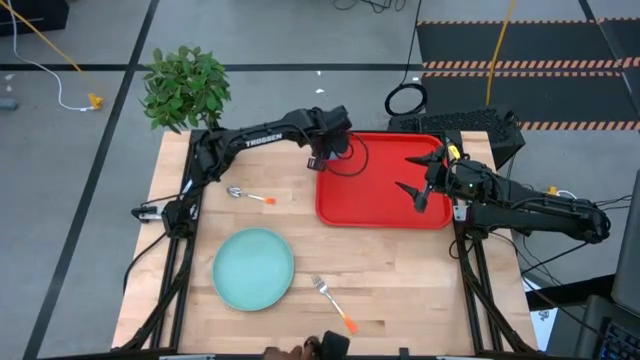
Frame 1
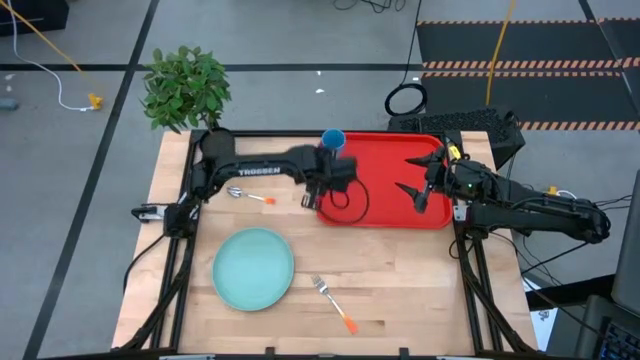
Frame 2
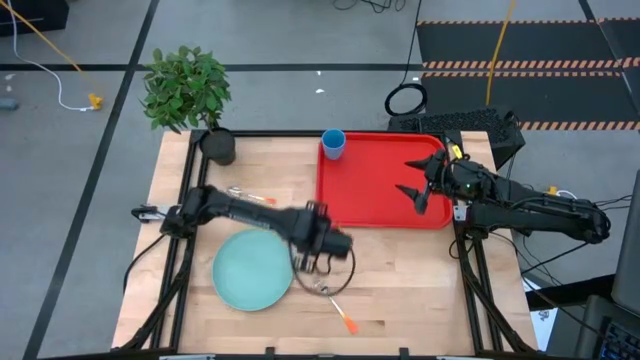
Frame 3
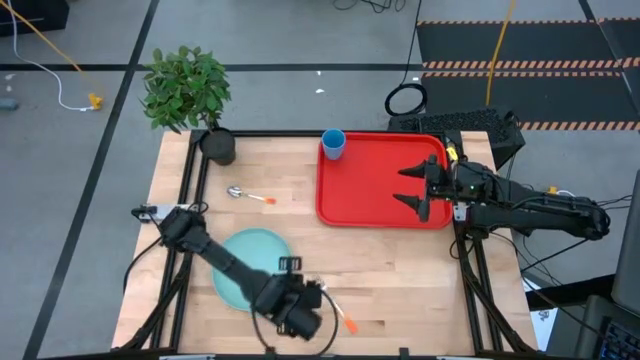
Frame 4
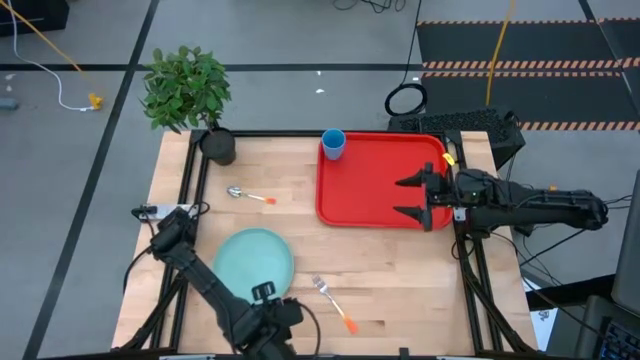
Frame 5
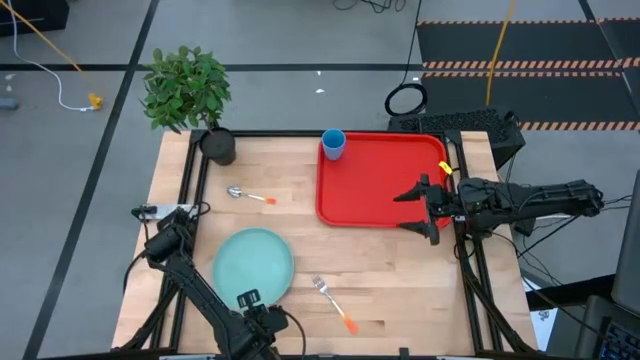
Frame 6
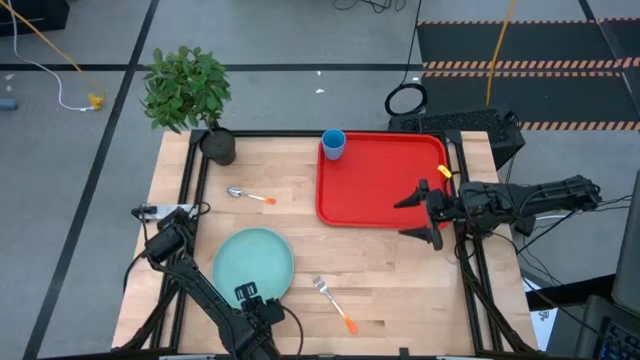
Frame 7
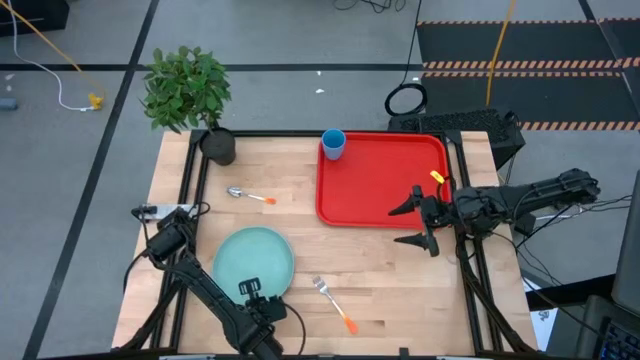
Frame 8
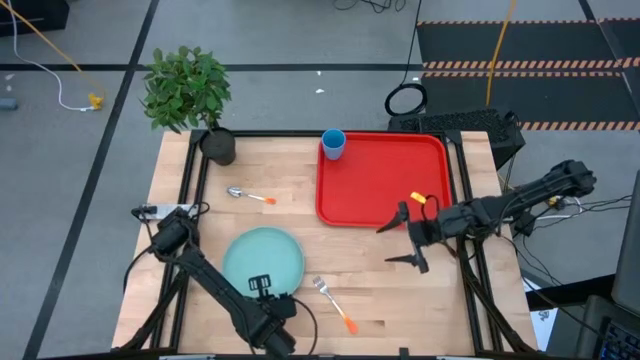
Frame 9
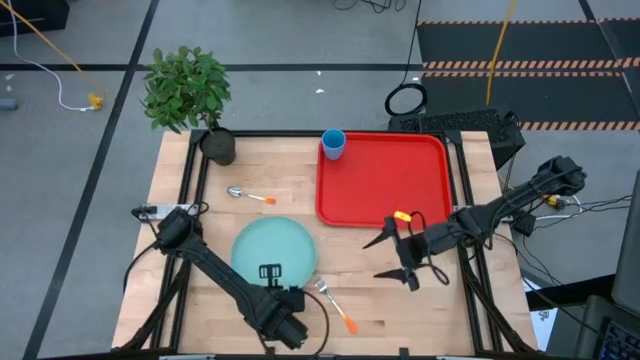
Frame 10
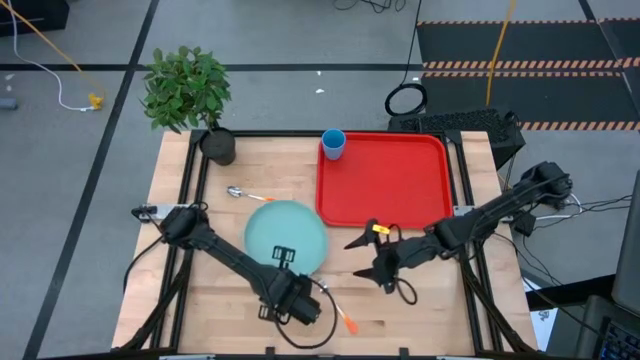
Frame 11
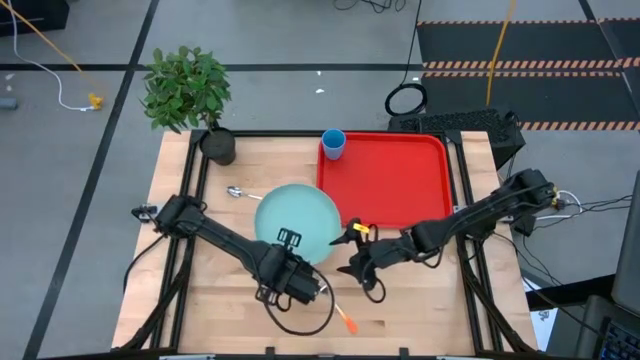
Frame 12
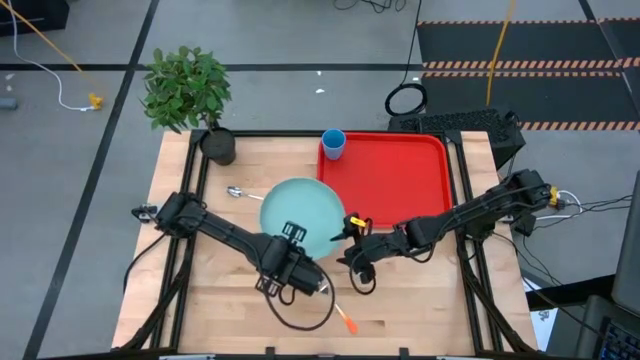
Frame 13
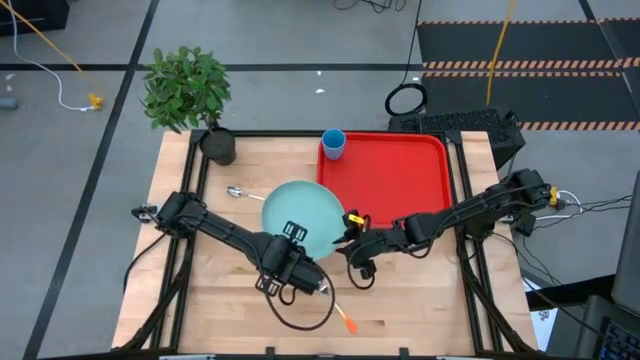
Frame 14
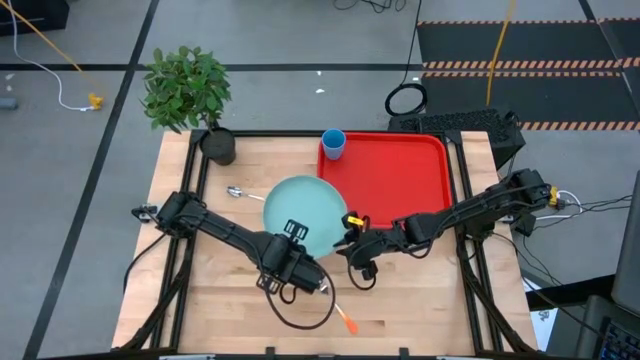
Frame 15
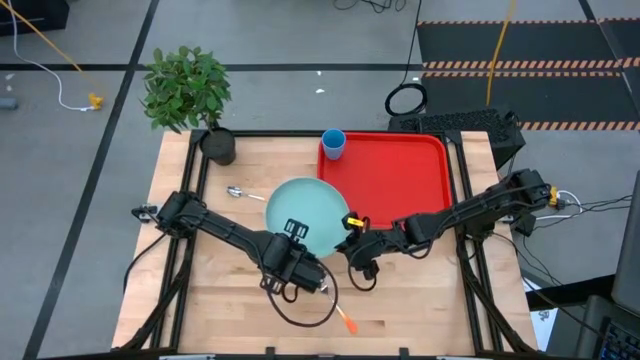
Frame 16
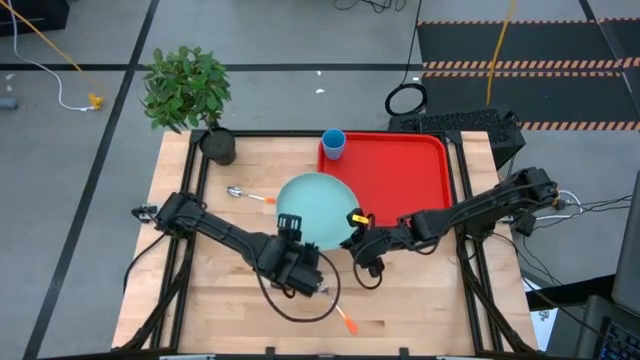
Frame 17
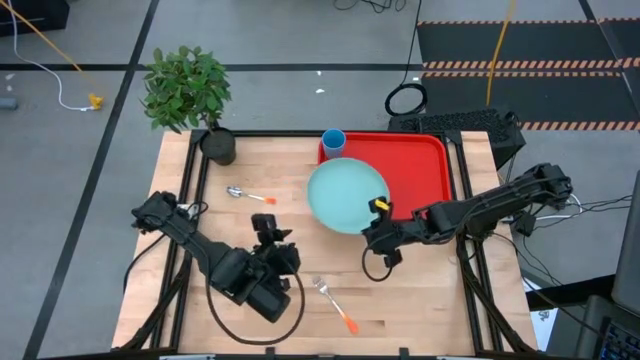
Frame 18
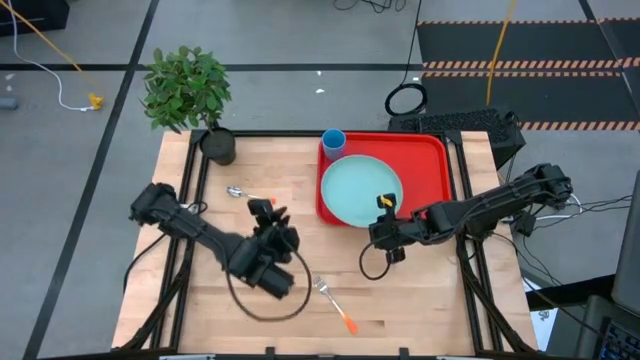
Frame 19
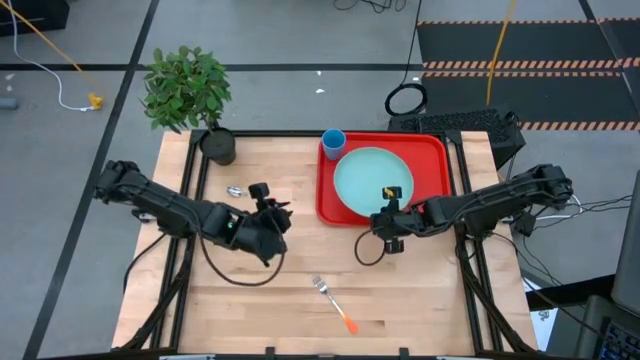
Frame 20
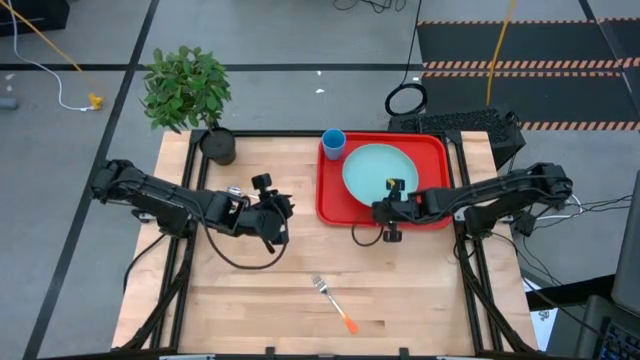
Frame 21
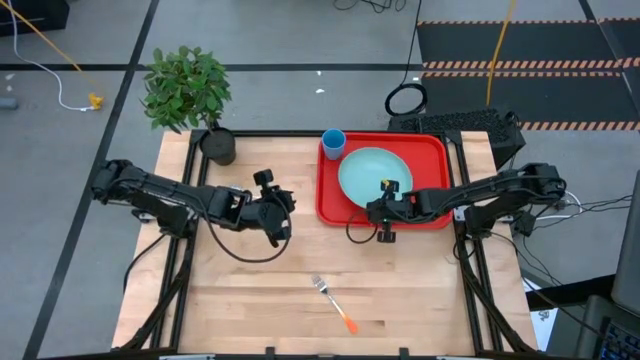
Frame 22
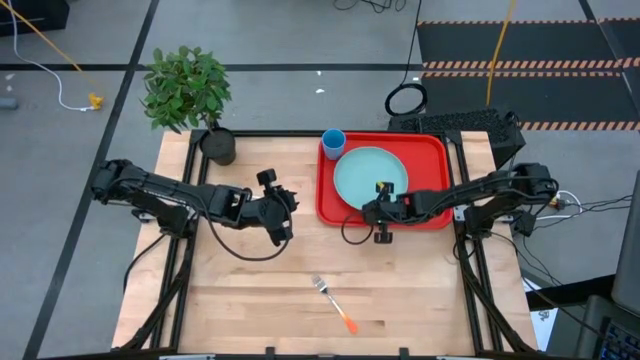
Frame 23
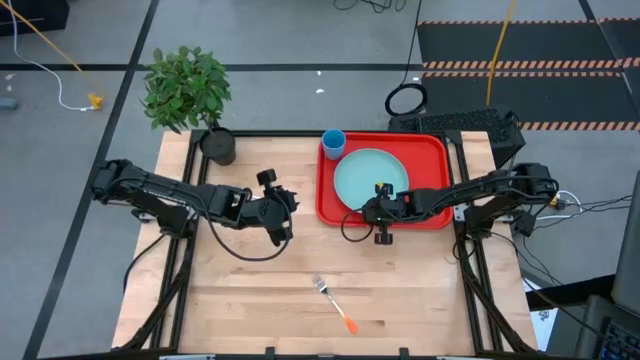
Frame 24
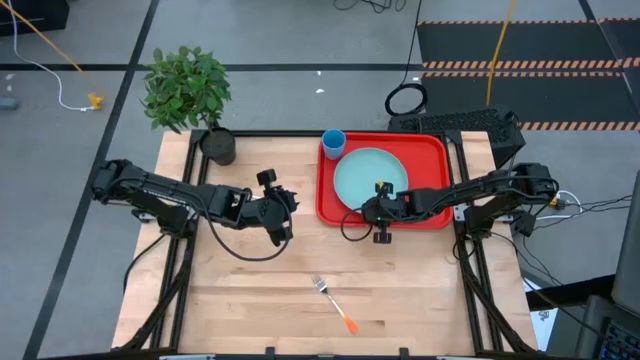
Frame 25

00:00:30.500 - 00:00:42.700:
Task: Pick and place plate/cup/fork/spoon on tray
Put the light blue plate on the red tray to the bottom right of the blue cup

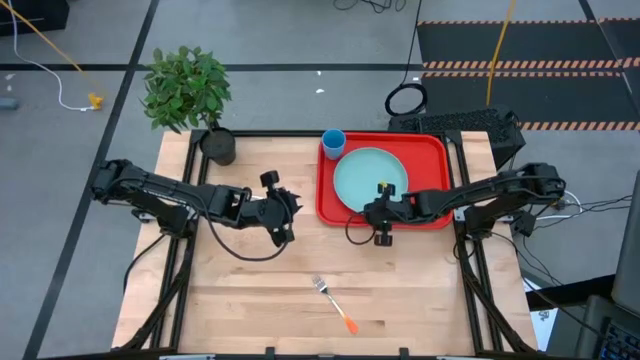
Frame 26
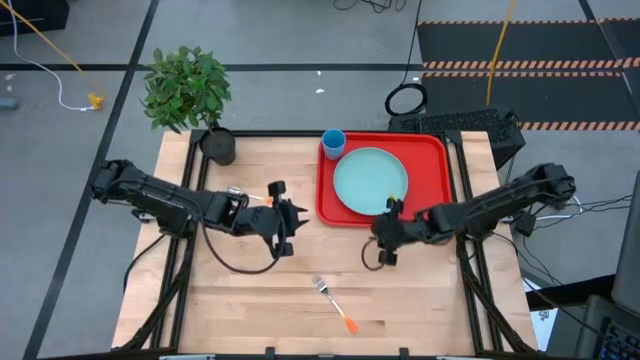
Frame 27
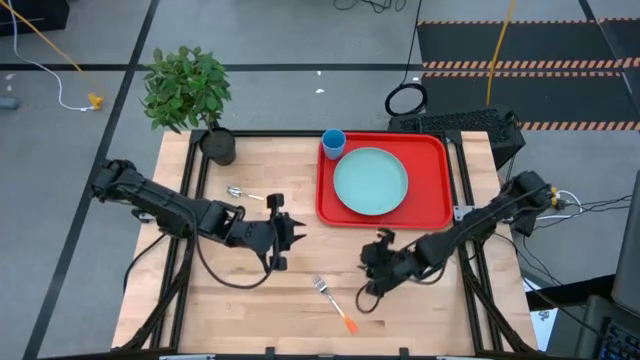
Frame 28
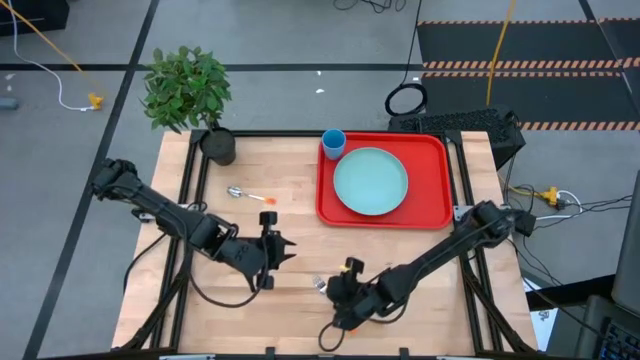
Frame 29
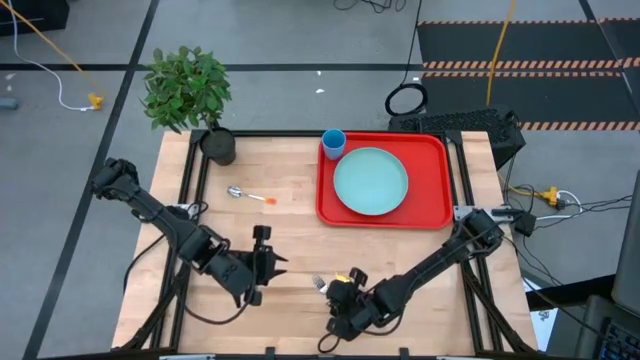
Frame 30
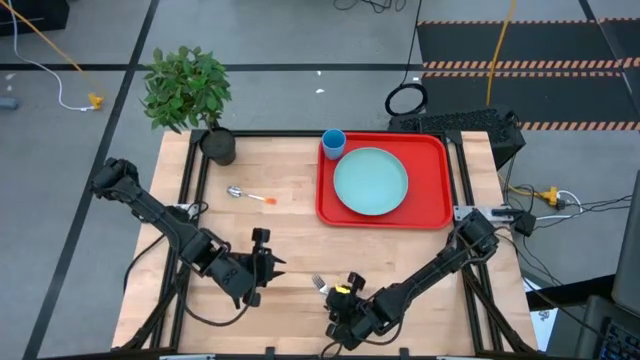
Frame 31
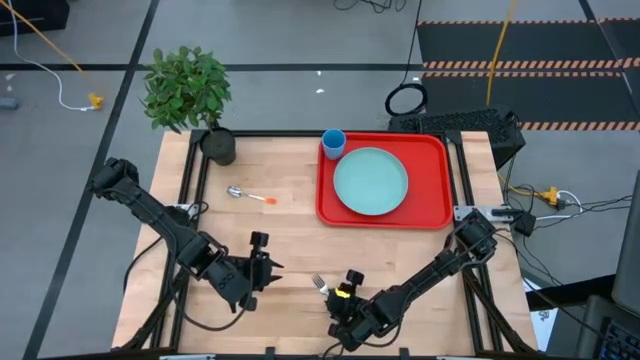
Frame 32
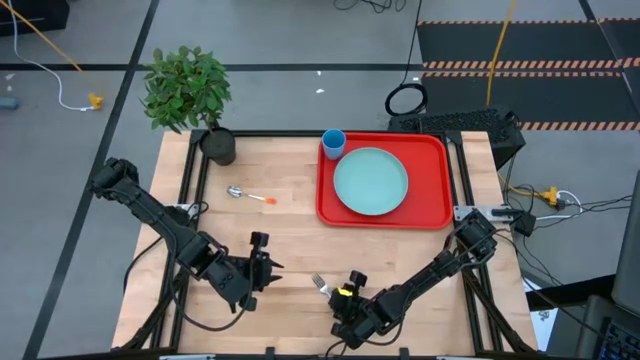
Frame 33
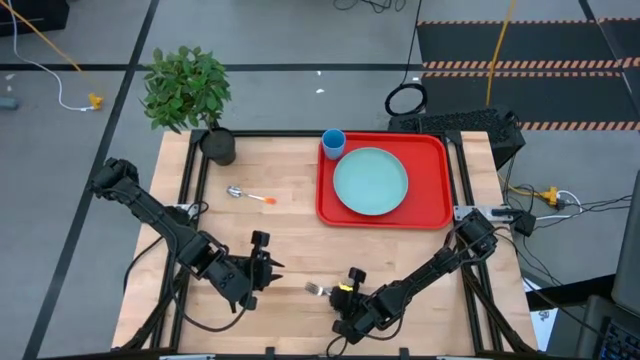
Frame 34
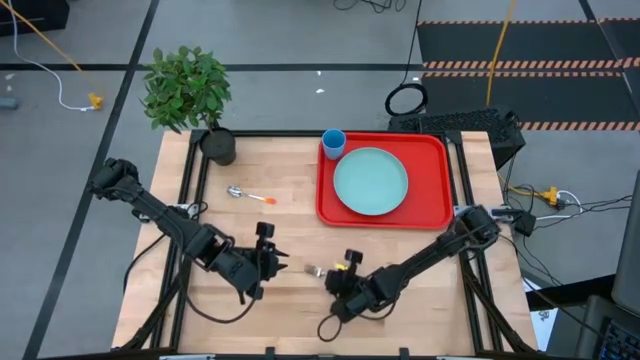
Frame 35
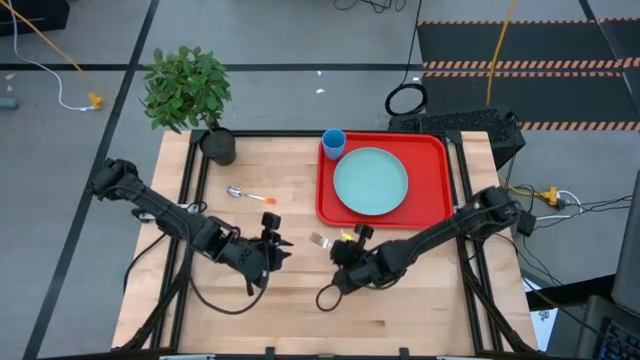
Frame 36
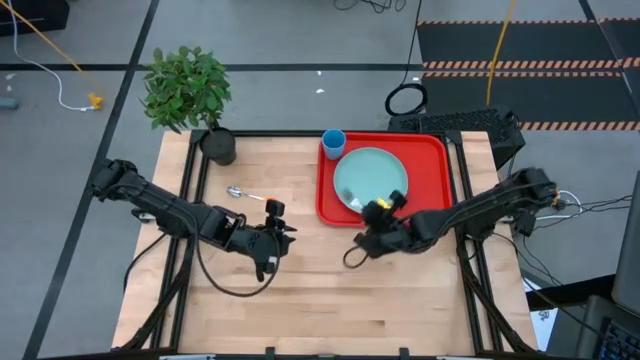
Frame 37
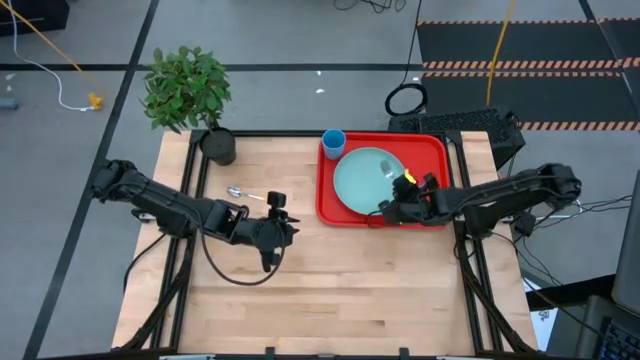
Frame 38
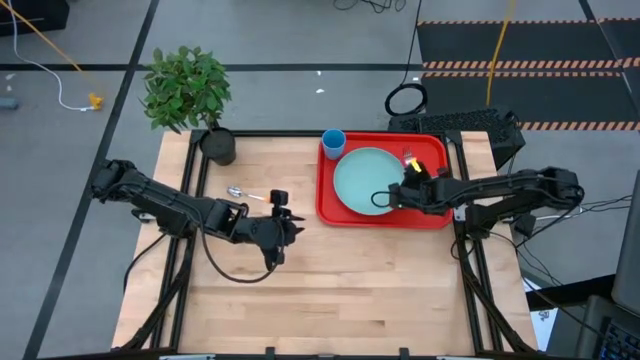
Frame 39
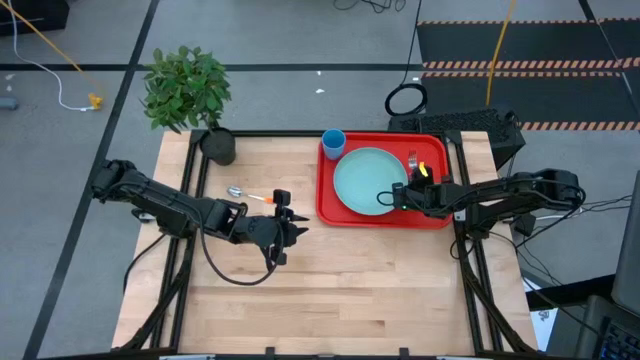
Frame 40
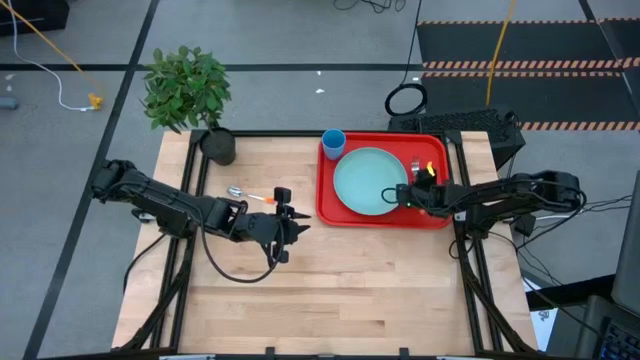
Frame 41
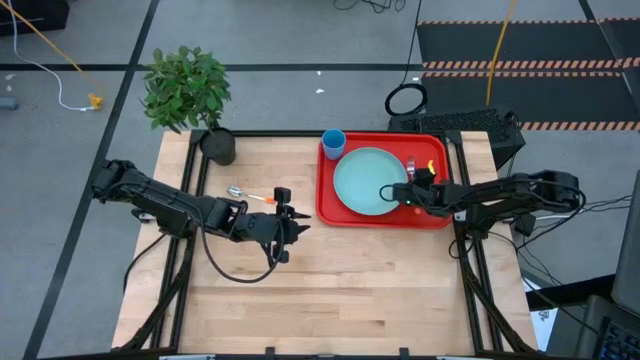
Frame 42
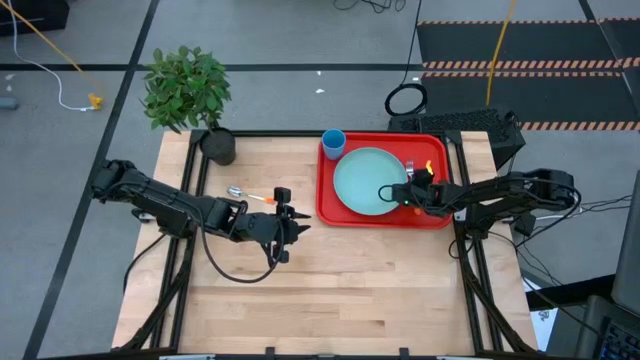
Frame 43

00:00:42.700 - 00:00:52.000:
Put the orange fork on the red tray to the right of the light blue plate
